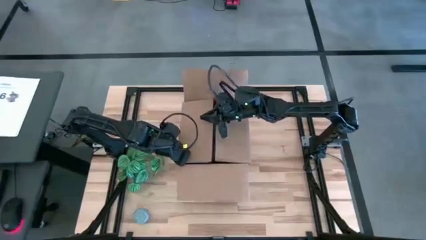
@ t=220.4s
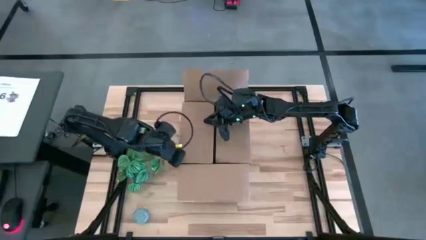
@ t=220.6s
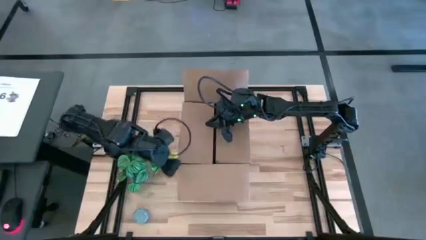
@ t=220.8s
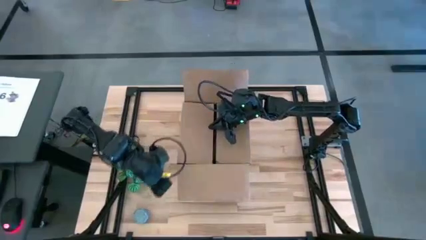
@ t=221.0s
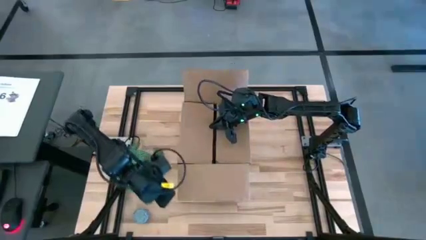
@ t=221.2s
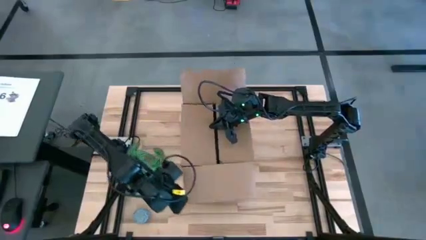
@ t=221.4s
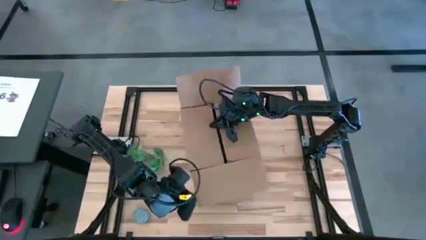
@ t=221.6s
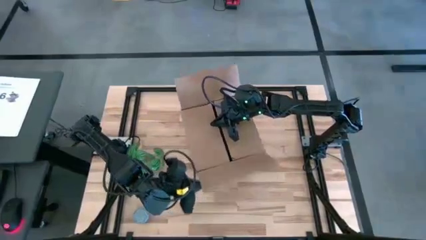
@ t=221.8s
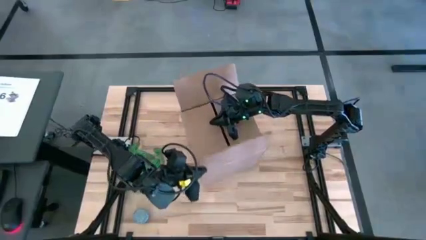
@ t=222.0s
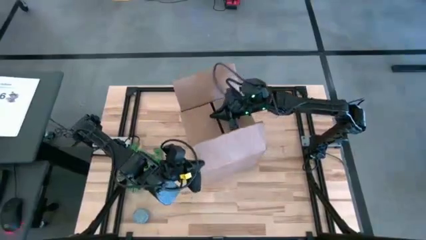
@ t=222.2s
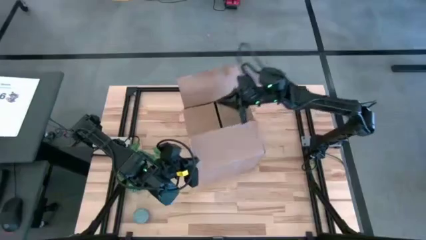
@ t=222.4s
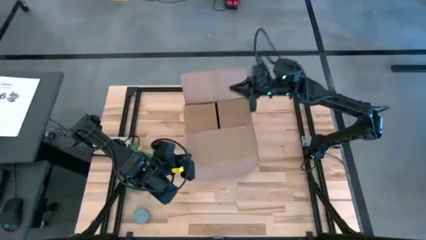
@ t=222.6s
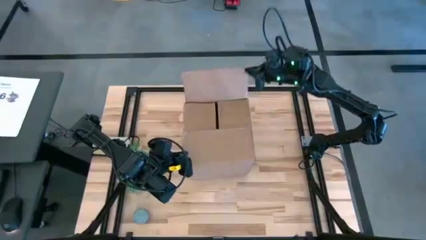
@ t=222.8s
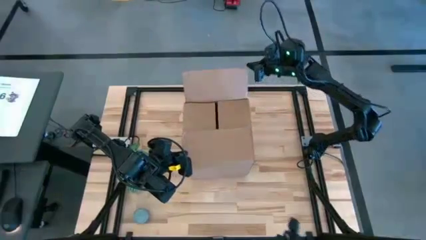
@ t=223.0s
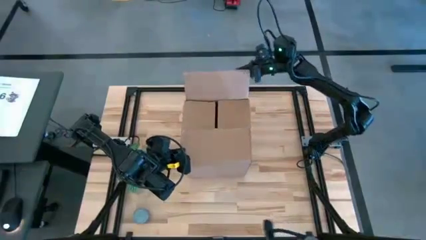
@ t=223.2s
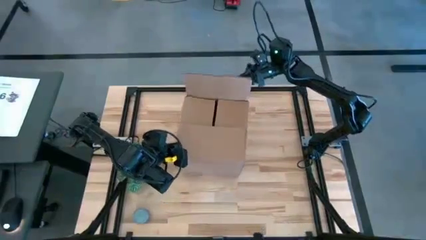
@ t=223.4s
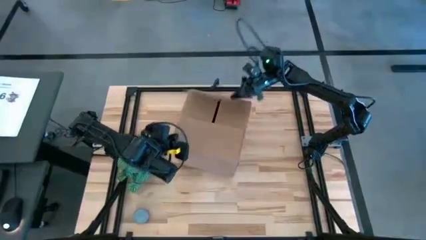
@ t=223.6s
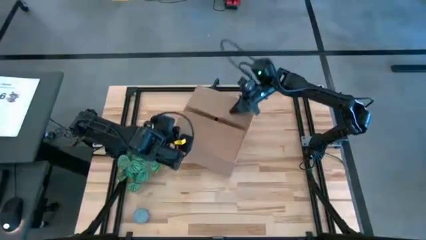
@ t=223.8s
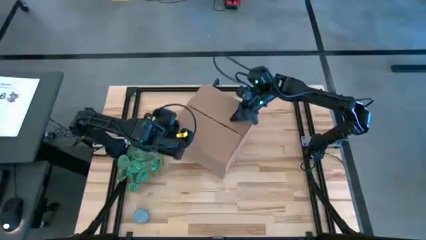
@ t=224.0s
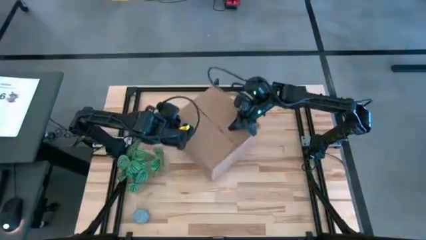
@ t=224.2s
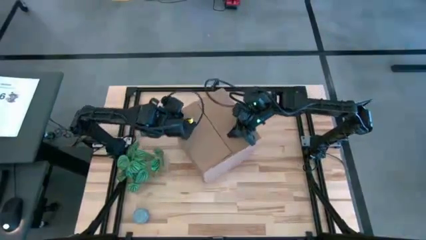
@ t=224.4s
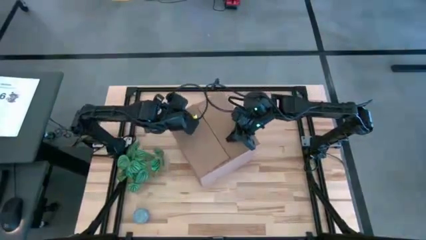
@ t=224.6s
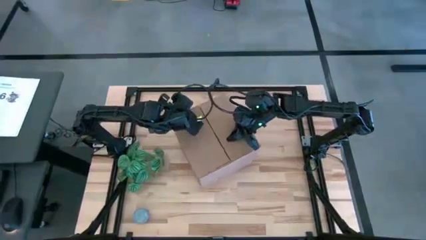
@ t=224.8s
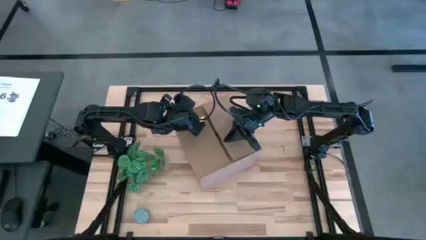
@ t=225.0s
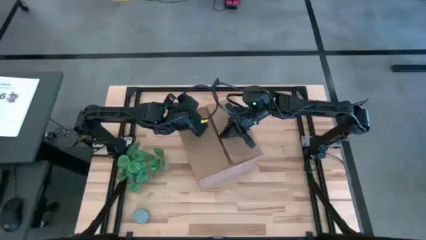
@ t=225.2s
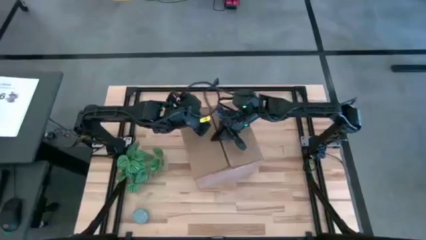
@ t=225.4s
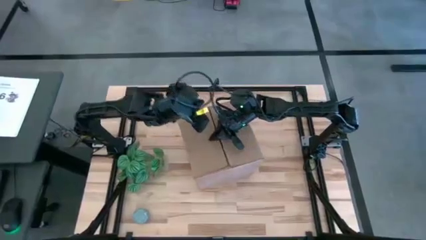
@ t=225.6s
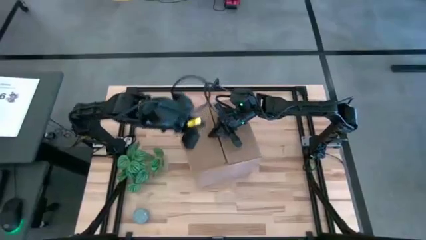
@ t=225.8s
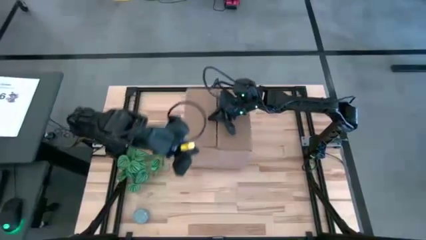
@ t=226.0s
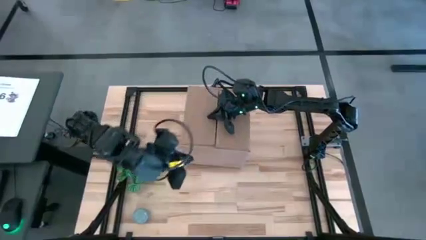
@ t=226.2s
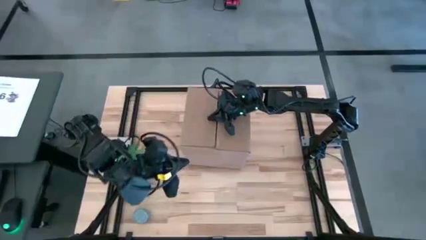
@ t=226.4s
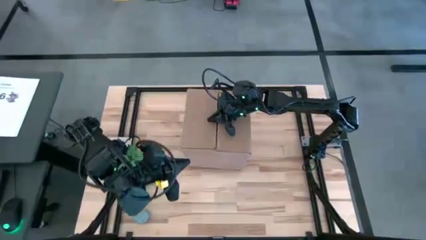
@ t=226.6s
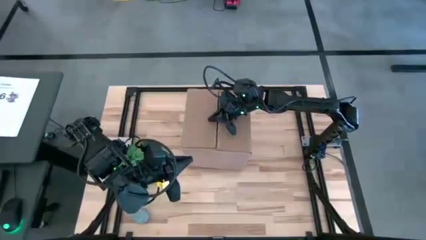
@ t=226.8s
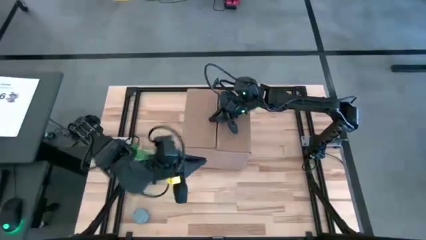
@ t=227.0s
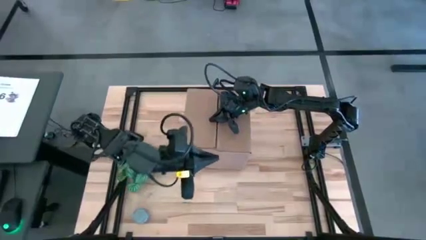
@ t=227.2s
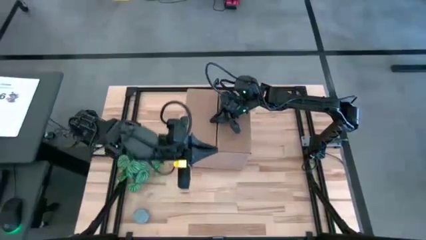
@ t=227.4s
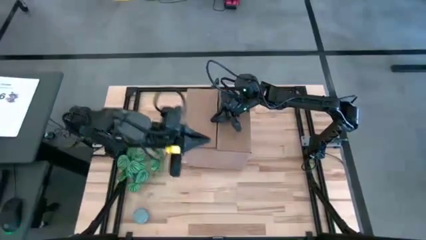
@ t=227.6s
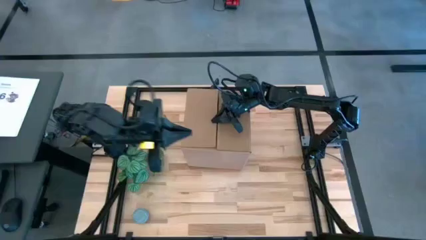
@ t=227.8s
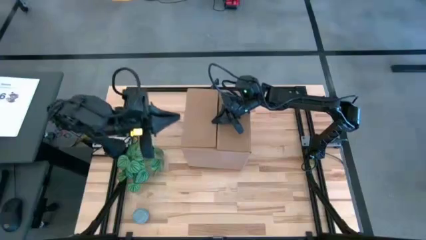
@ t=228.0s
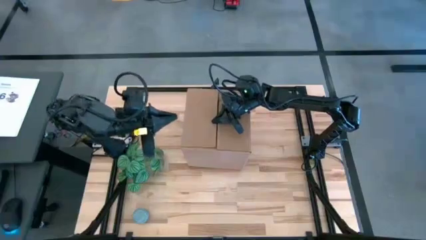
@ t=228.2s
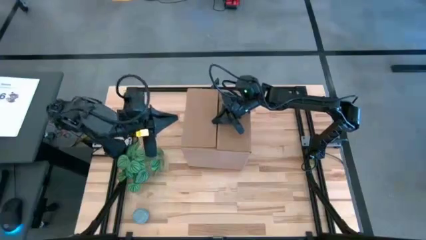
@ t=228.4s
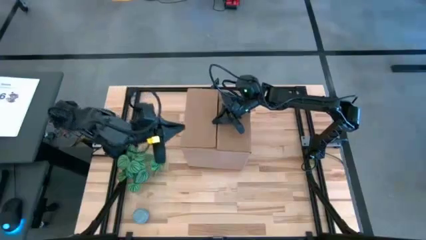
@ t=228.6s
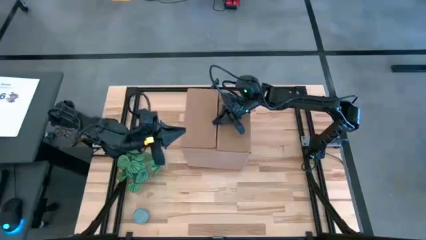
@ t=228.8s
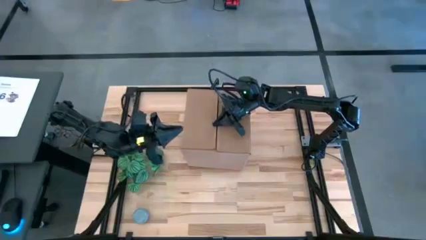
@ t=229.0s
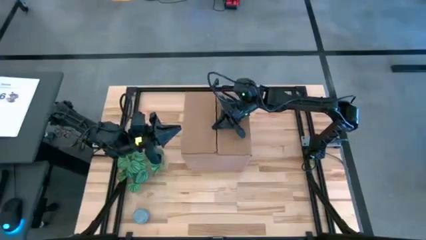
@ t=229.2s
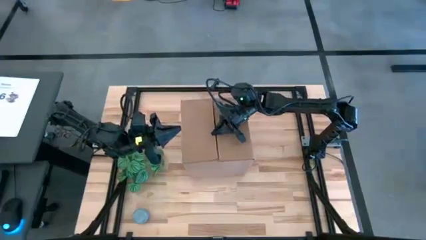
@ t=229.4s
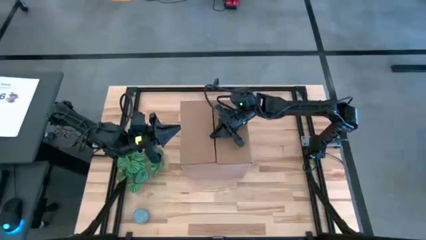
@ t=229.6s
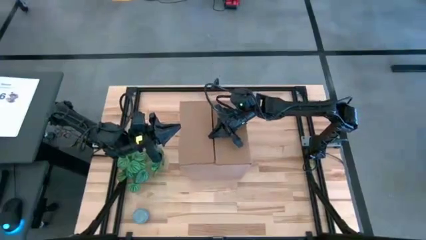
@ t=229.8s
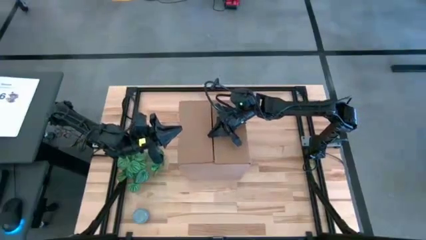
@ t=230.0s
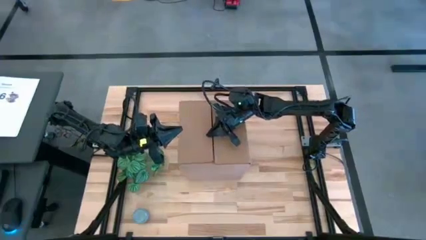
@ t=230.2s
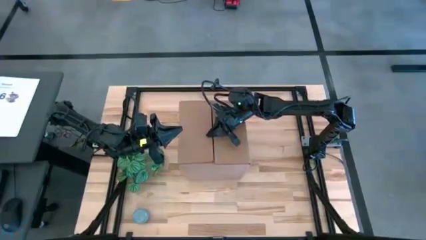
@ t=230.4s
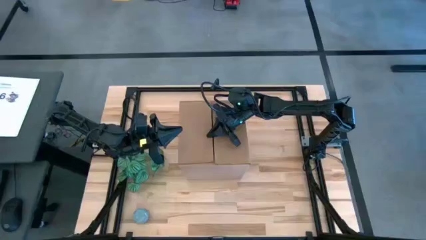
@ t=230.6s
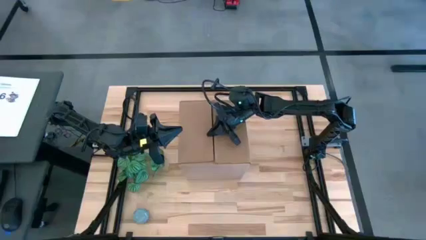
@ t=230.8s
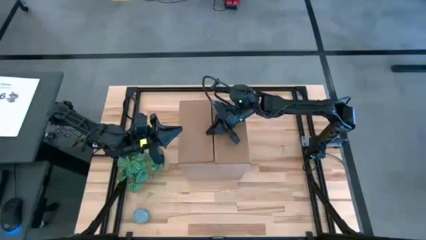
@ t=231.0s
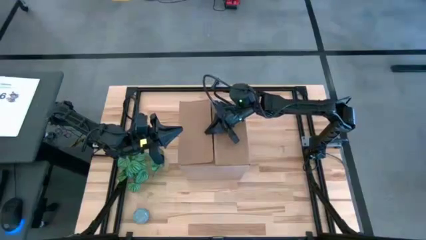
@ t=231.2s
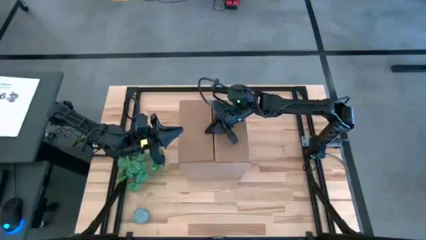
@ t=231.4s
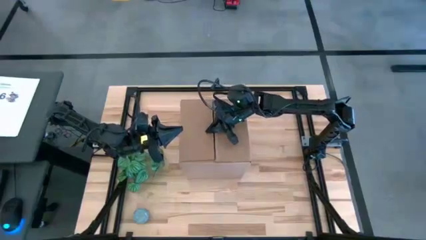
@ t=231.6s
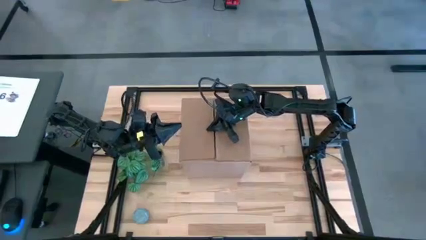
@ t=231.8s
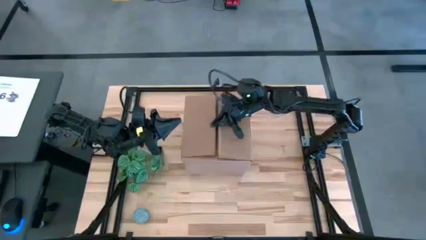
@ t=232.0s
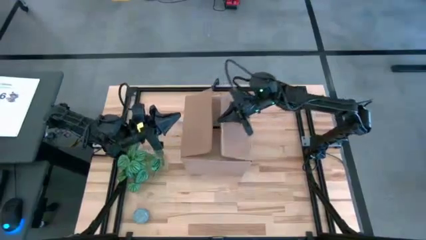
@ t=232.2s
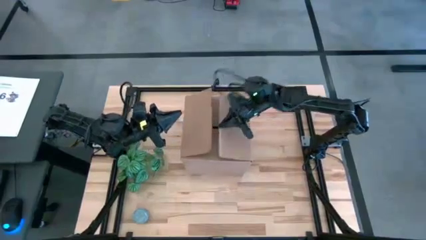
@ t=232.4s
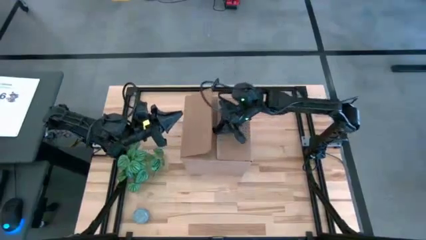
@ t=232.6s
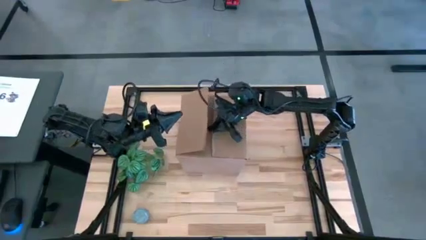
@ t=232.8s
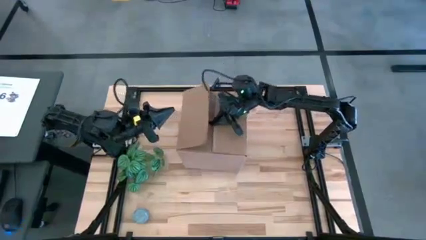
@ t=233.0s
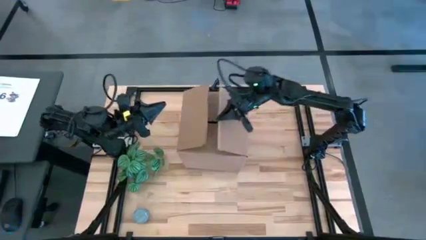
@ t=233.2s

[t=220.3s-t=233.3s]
Task: wrap mug
Close the cardboard box
